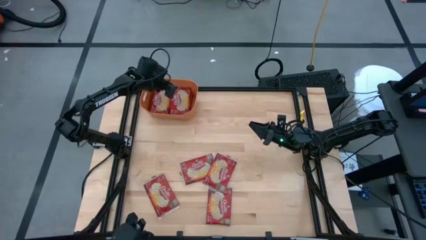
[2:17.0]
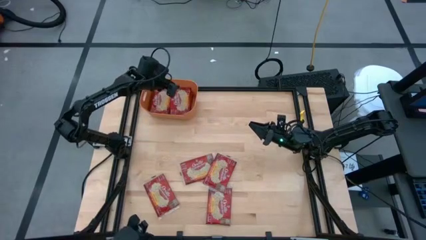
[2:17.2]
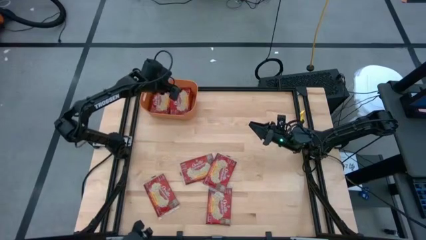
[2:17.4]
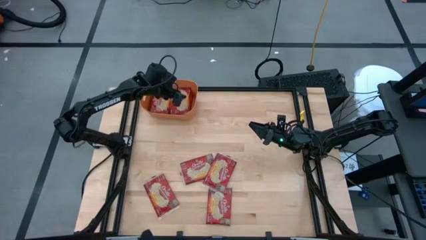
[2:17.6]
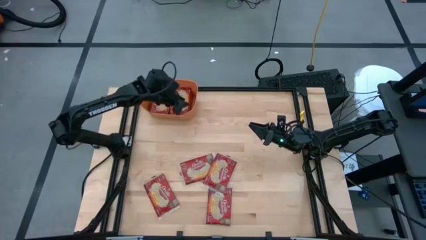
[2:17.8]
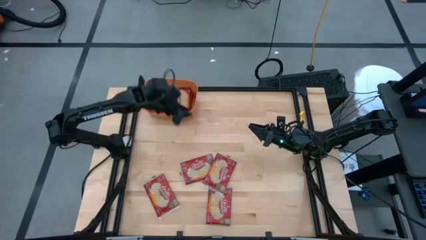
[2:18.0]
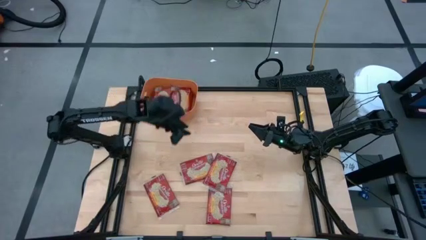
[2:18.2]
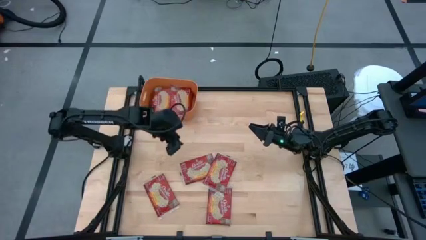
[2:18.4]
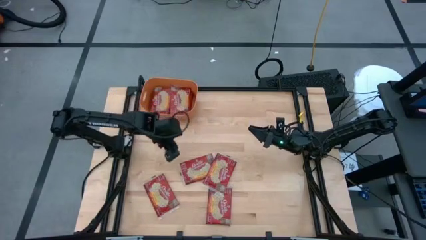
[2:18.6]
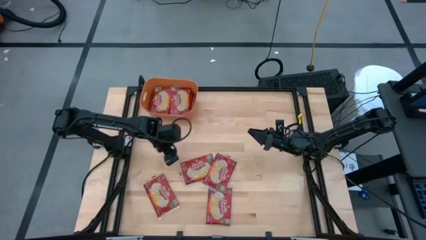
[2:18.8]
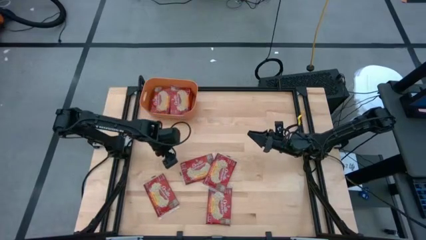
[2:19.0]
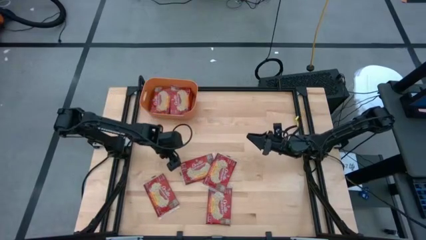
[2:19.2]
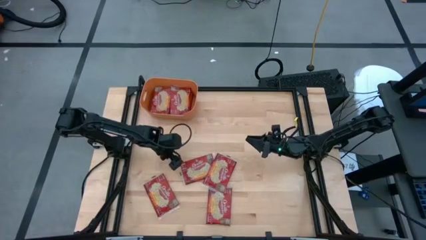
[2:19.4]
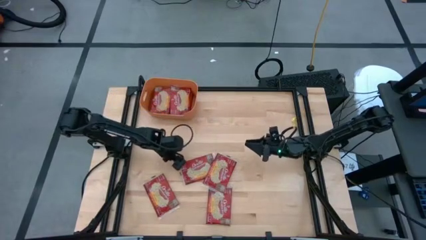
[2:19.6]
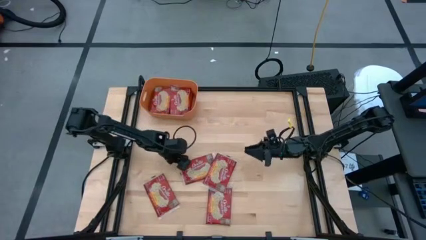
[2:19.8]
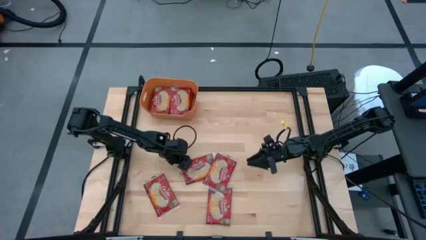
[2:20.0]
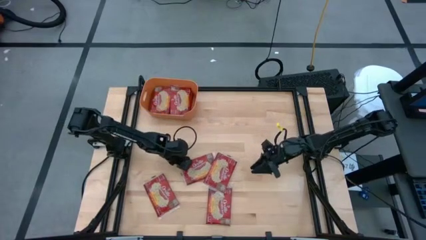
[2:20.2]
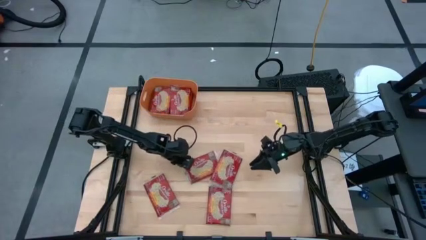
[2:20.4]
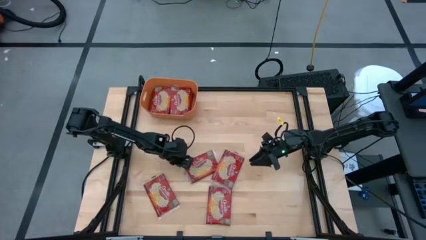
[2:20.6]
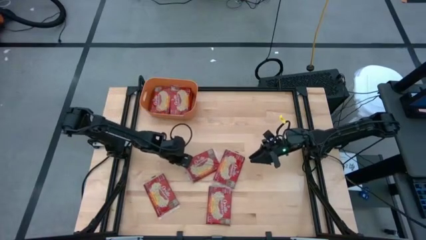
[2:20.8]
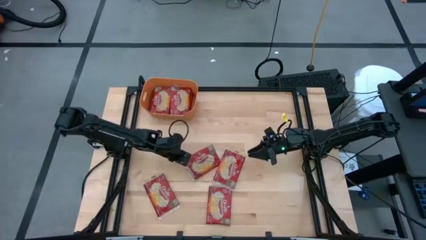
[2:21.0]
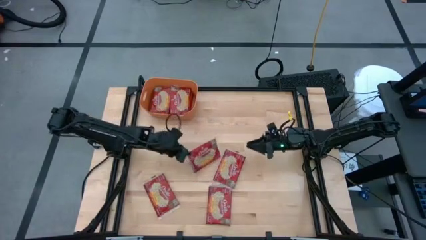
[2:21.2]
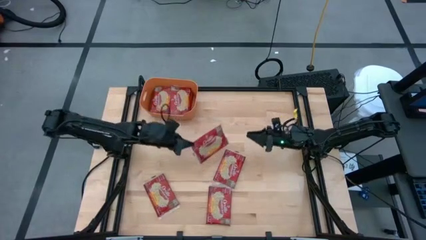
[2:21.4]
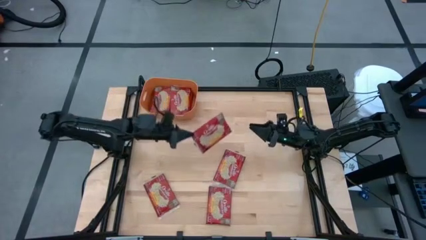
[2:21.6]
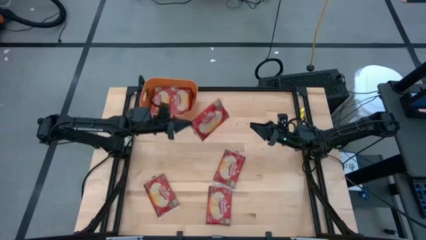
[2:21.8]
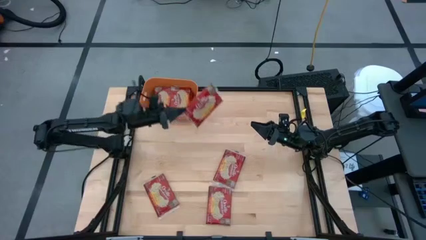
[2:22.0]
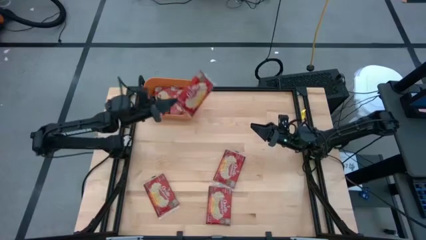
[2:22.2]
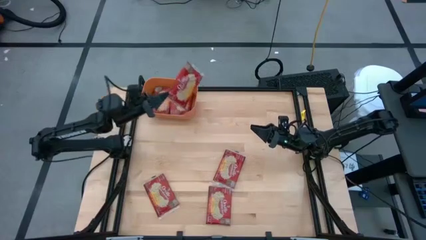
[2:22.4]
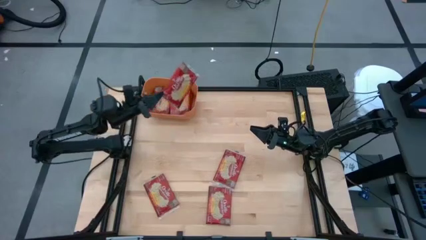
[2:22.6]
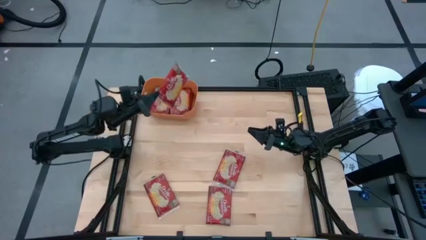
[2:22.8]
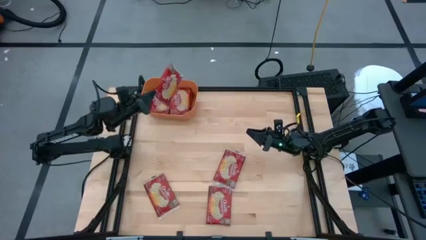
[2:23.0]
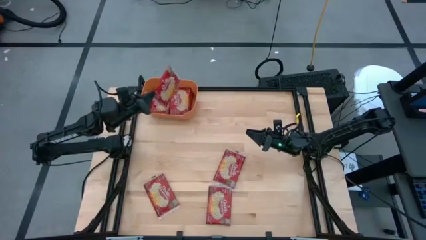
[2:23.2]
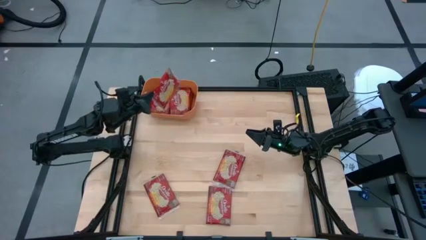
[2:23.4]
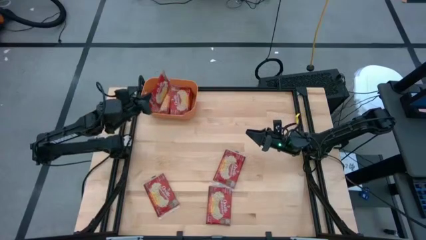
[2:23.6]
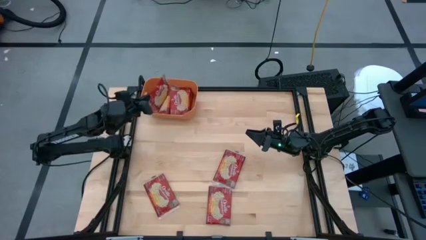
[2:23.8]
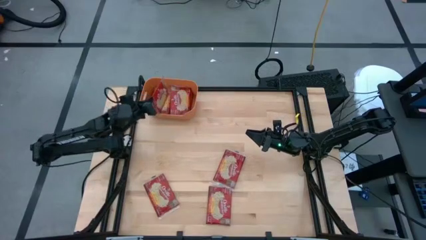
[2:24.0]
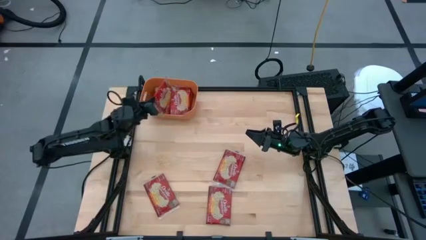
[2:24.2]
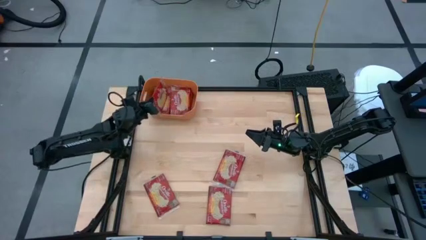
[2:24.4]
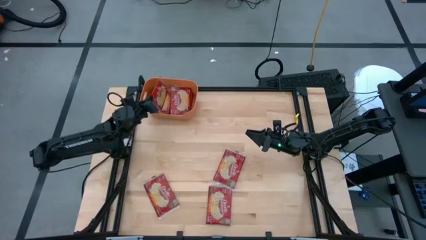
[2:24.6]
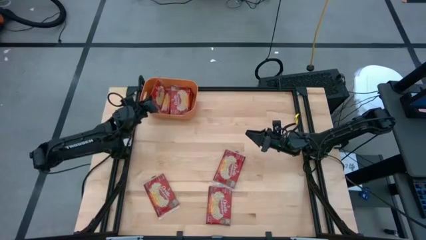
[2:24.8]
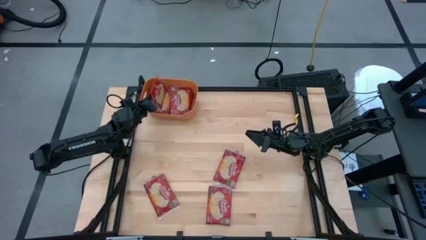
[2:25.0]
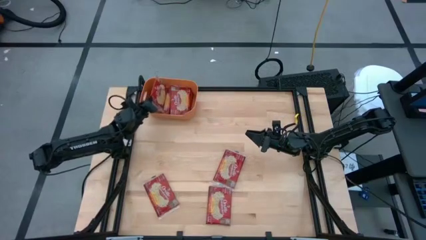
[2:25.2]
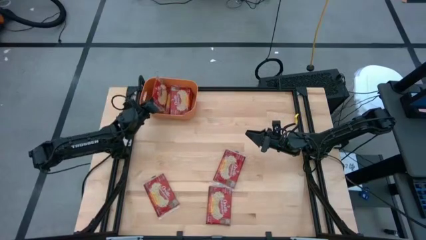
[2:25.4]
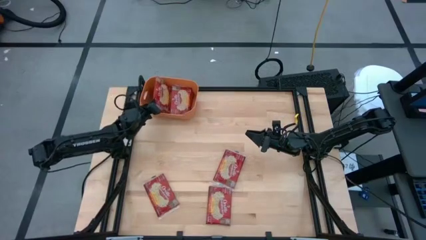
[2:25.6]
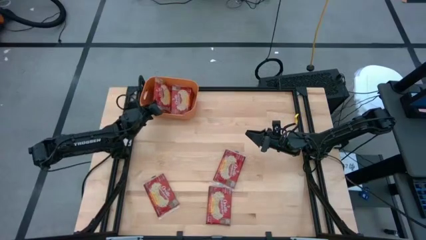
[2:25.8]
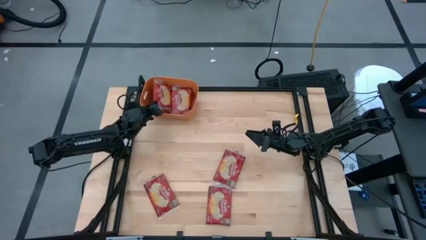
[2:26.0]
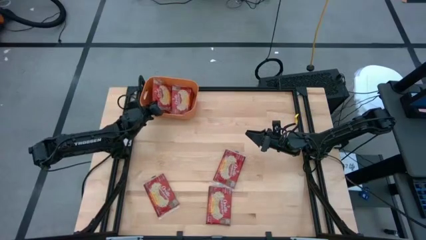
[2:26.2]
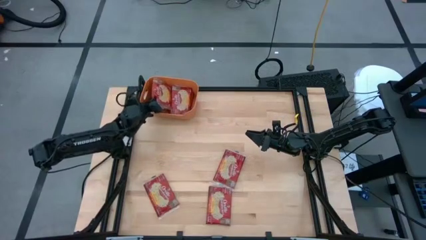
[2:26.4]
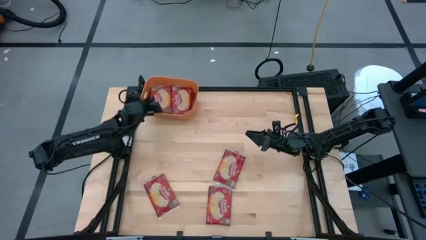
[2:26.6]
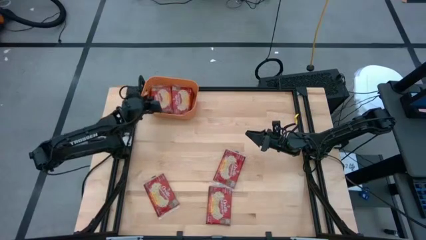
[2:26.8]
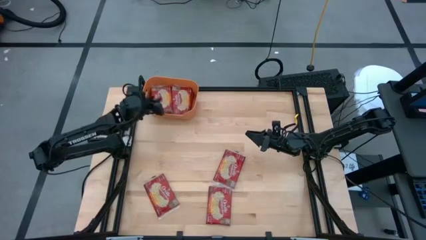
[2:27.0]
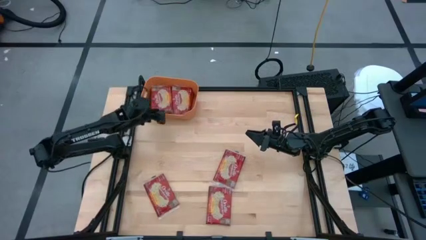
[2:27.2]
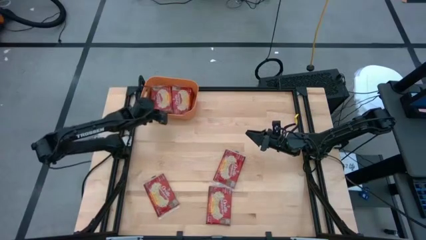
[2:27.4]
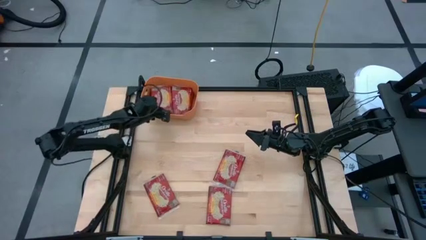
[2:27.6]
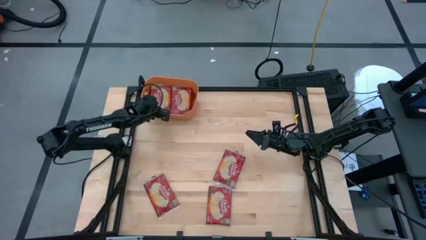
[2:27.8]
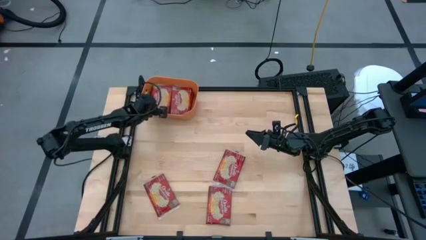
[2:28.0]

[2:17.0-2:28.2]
Task: Sort popcorn bags into baskets
Stack the red popcorn bag on top of the red popcorn bag in the orange bin
